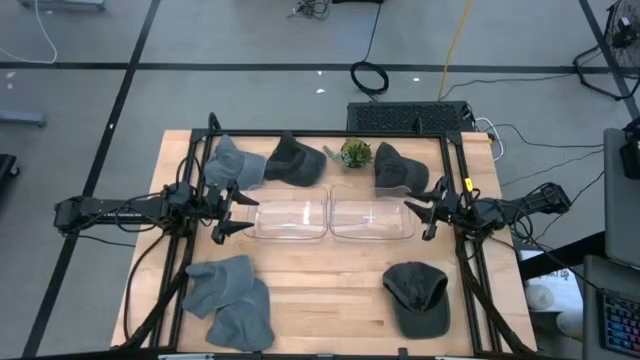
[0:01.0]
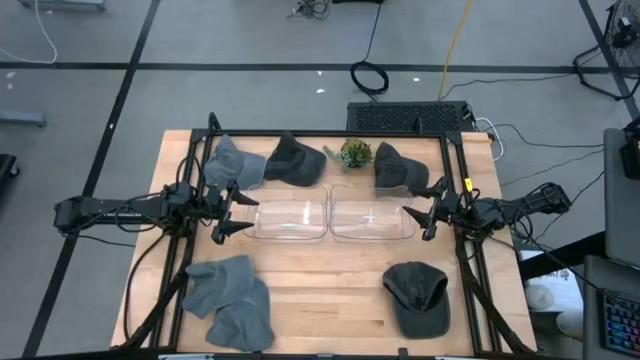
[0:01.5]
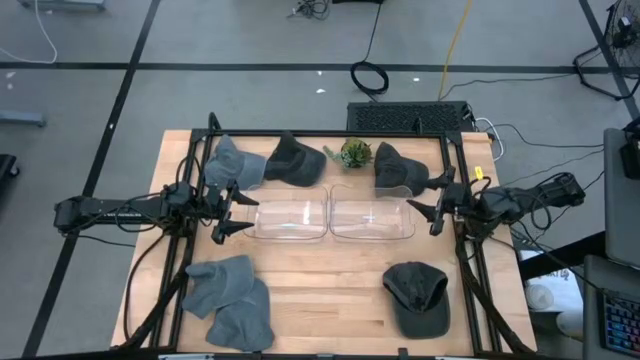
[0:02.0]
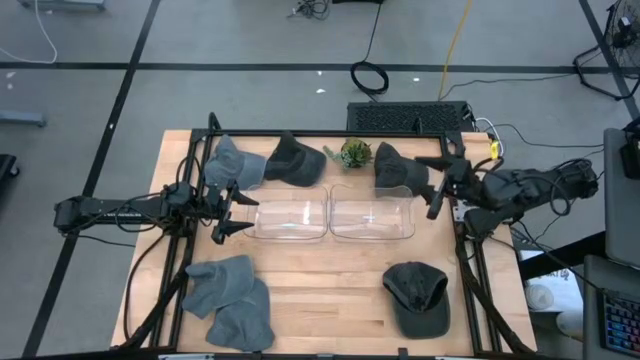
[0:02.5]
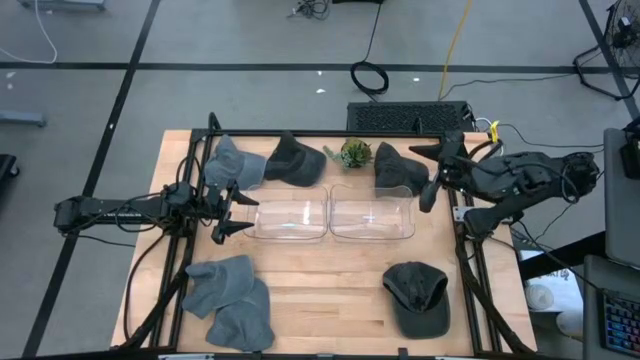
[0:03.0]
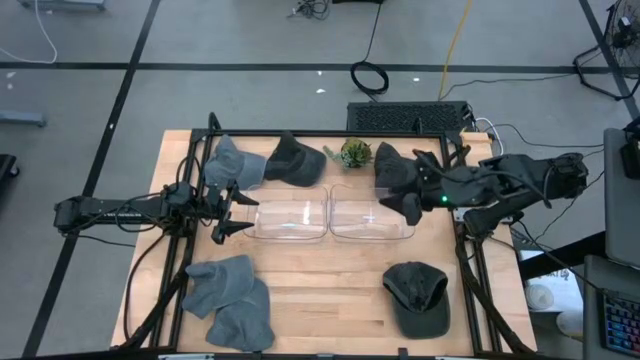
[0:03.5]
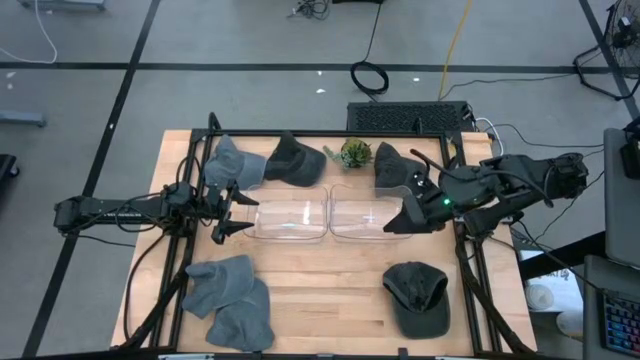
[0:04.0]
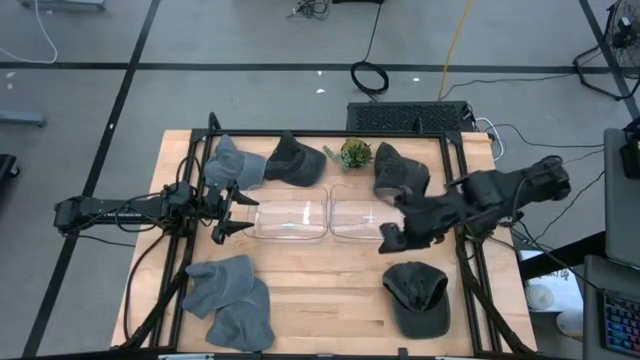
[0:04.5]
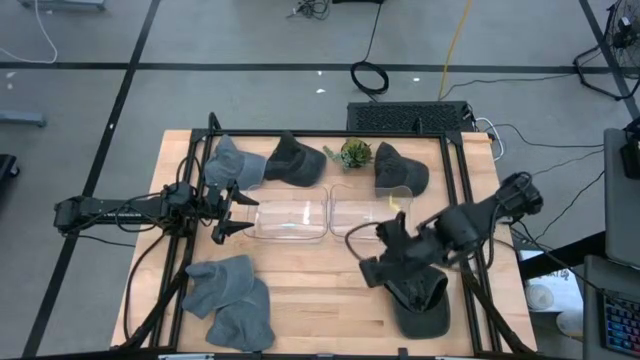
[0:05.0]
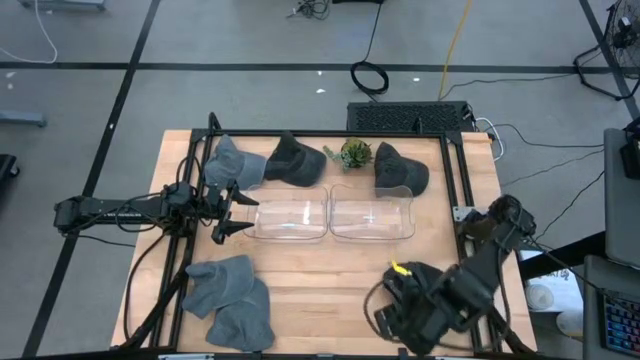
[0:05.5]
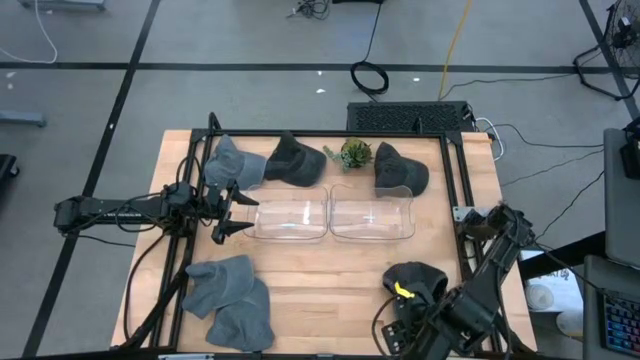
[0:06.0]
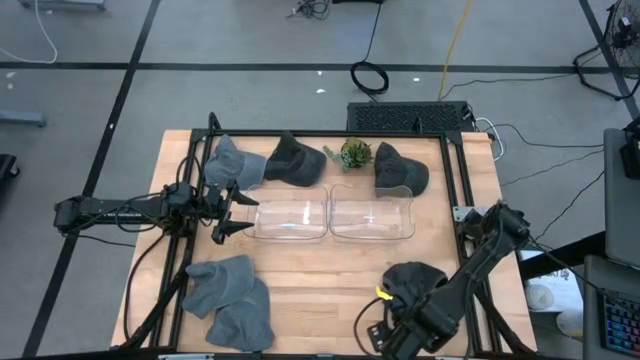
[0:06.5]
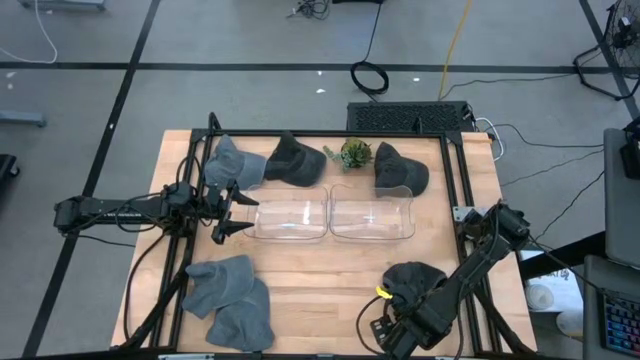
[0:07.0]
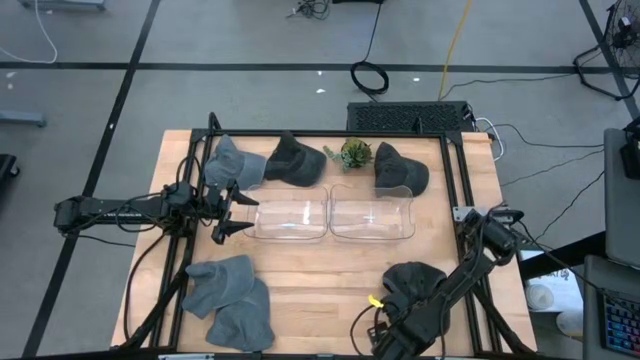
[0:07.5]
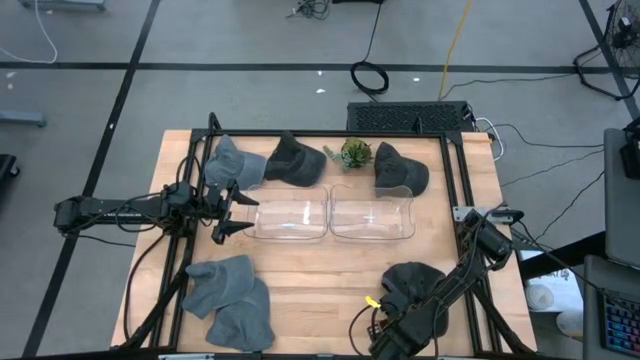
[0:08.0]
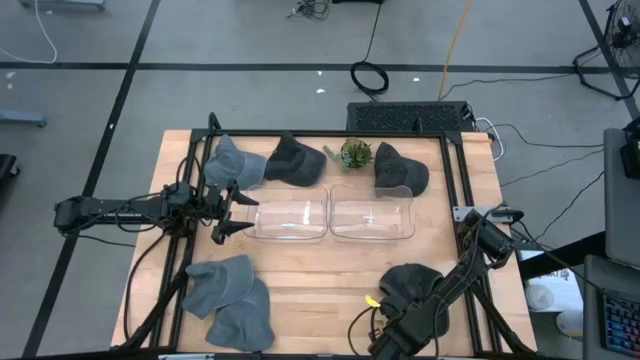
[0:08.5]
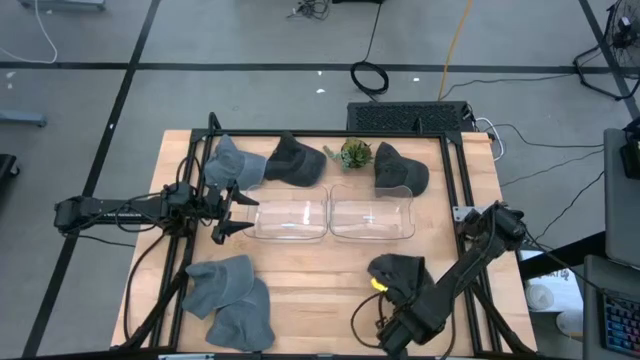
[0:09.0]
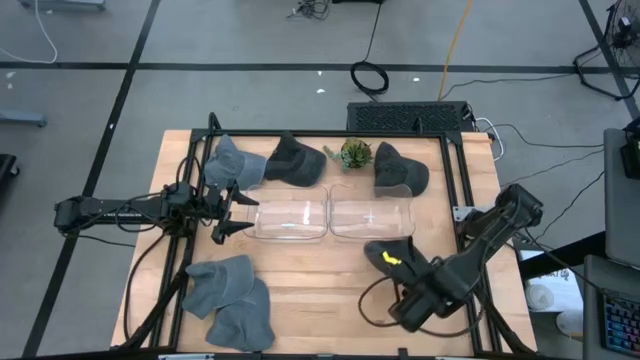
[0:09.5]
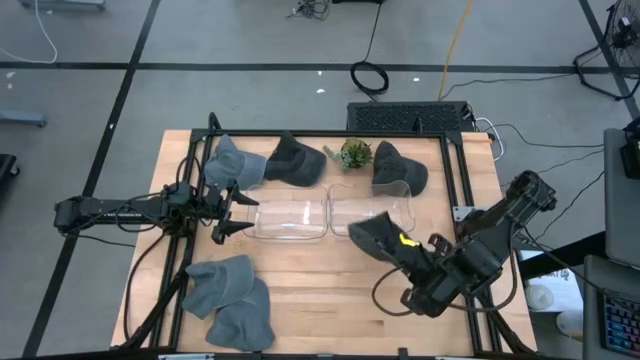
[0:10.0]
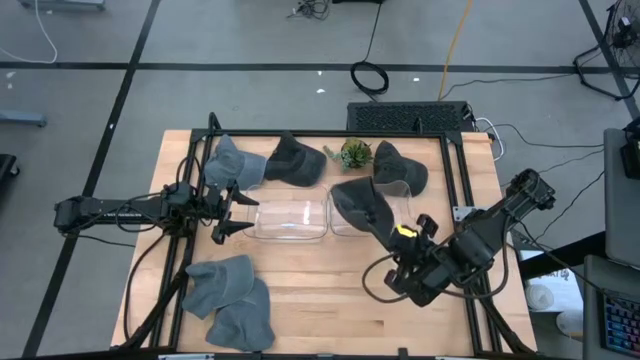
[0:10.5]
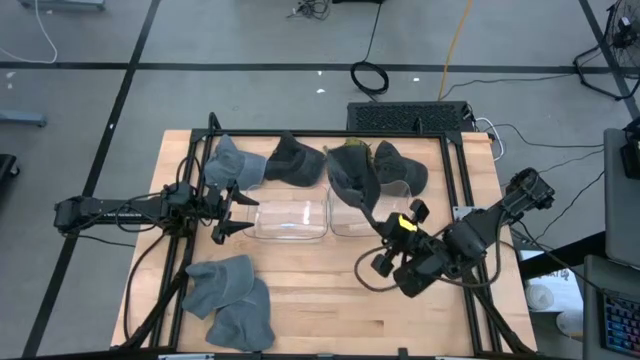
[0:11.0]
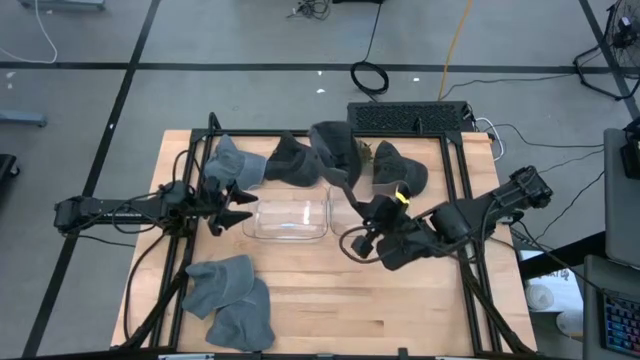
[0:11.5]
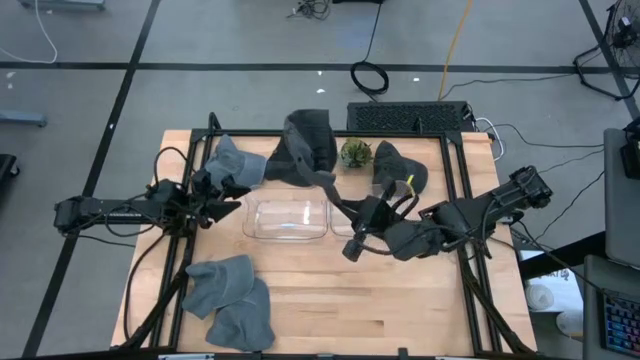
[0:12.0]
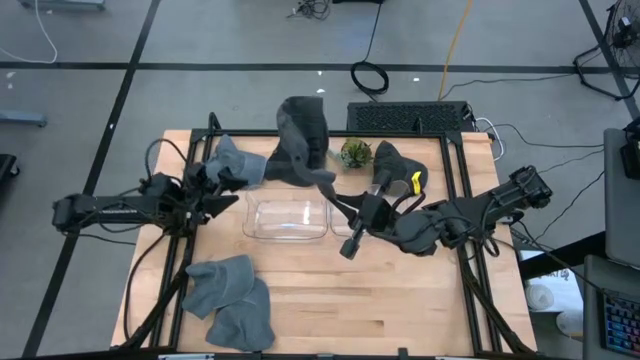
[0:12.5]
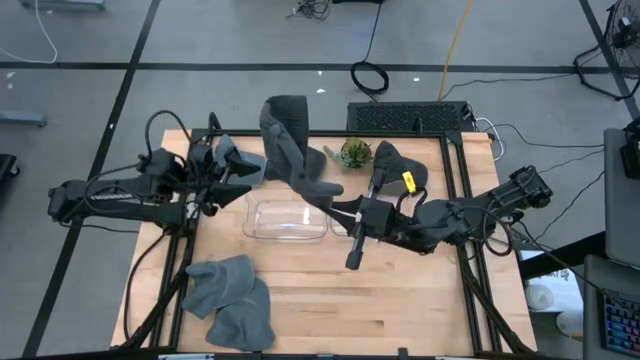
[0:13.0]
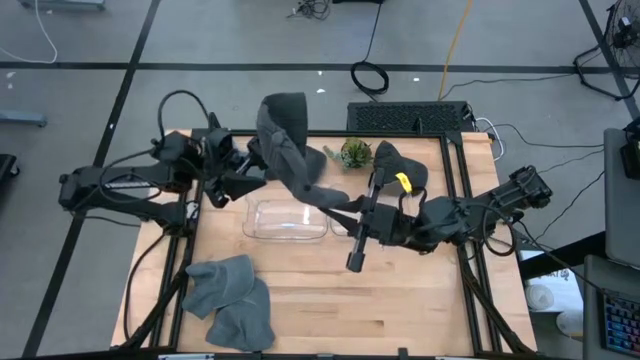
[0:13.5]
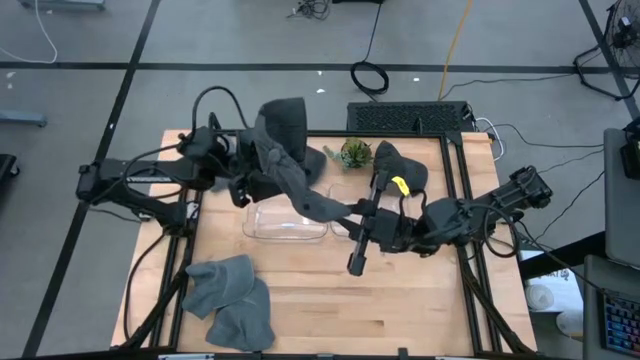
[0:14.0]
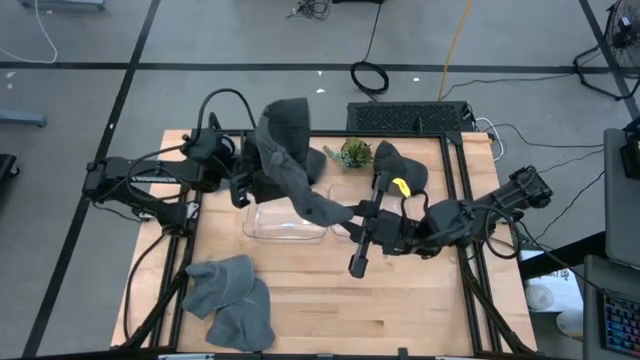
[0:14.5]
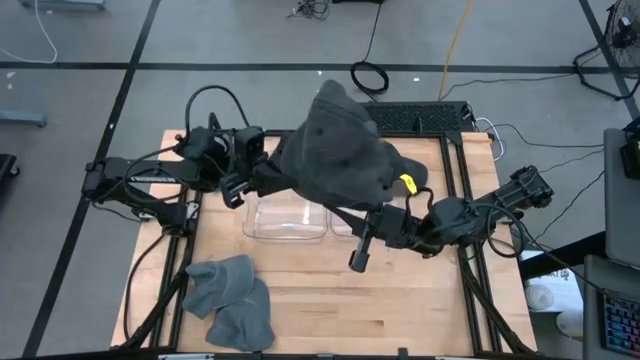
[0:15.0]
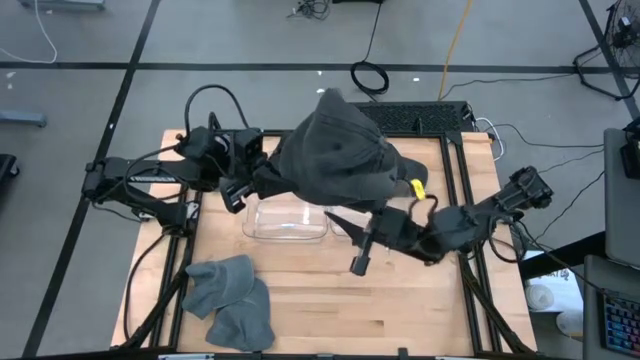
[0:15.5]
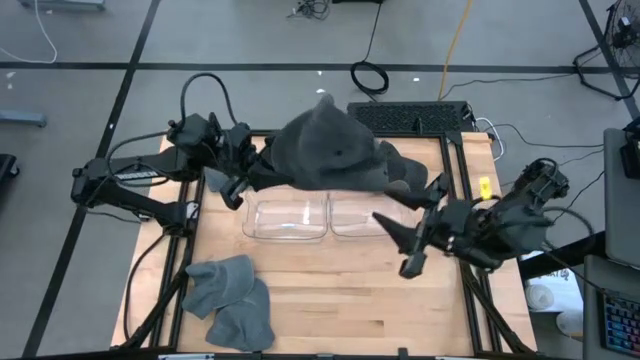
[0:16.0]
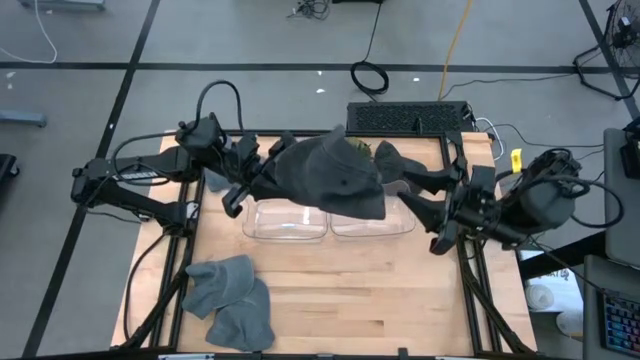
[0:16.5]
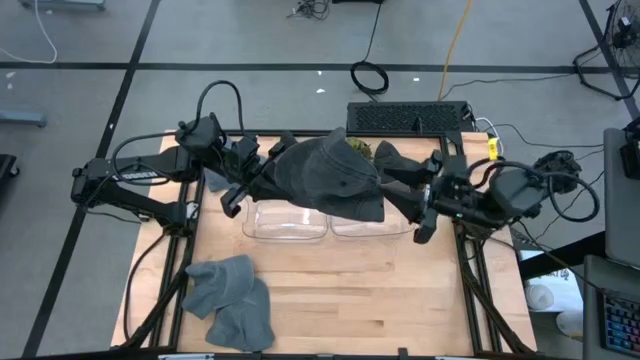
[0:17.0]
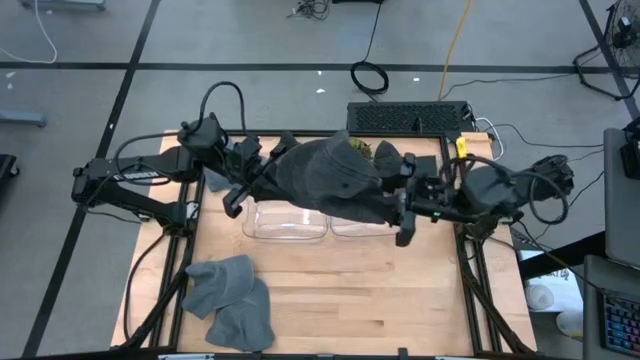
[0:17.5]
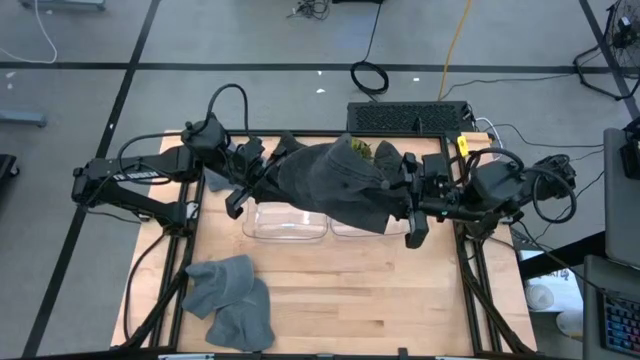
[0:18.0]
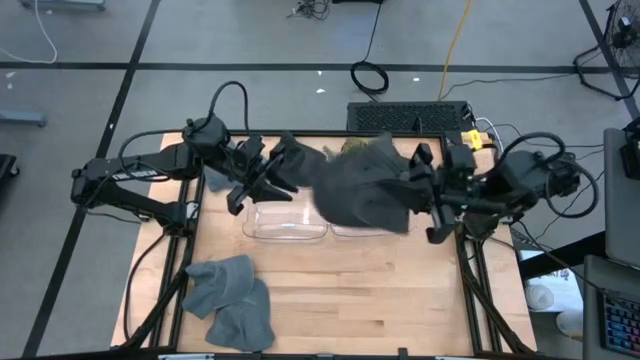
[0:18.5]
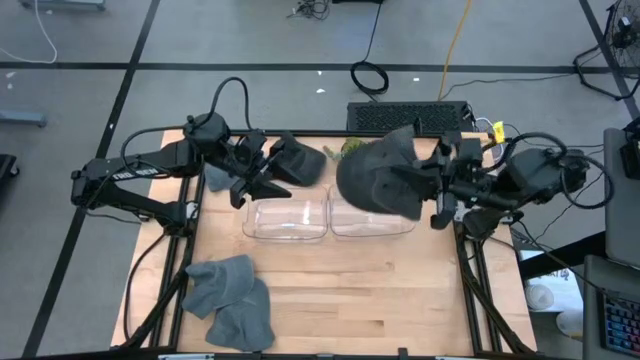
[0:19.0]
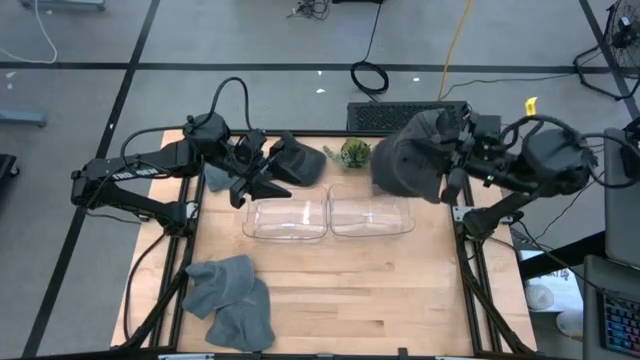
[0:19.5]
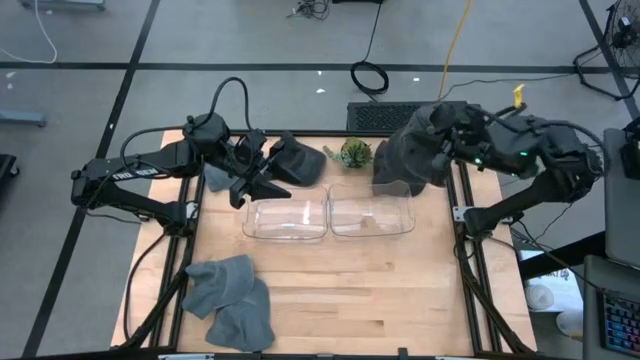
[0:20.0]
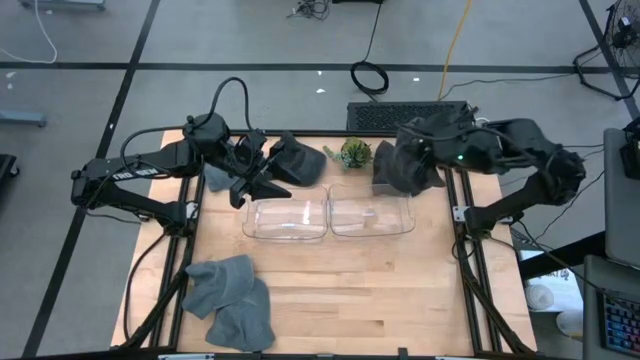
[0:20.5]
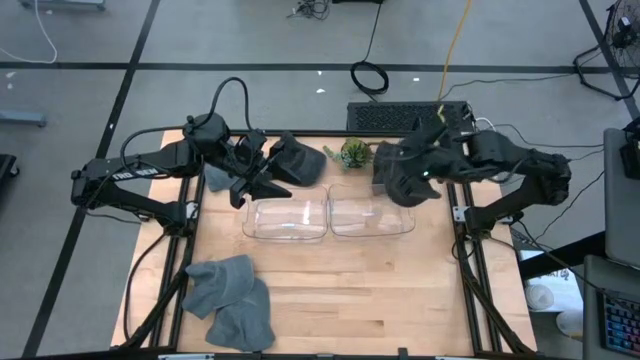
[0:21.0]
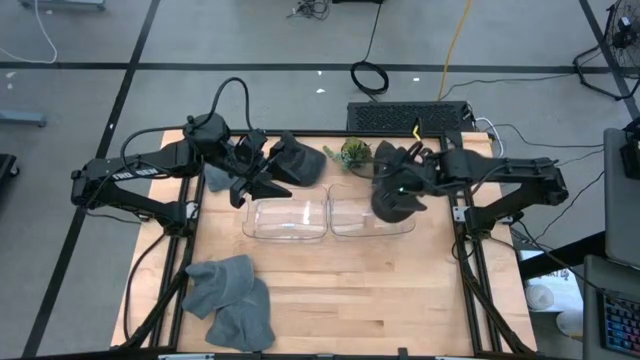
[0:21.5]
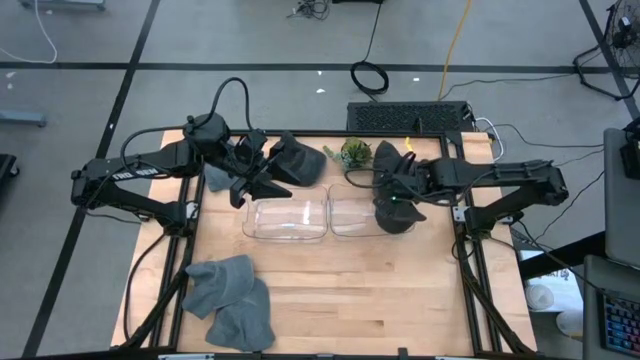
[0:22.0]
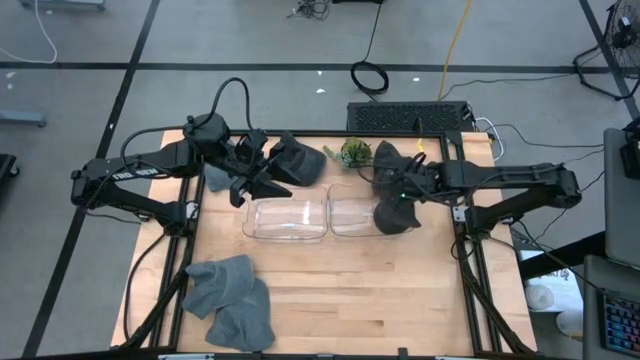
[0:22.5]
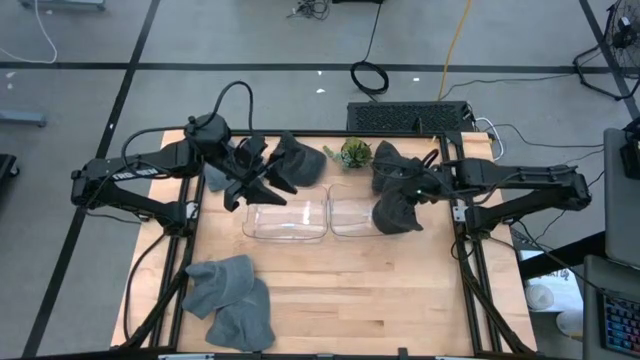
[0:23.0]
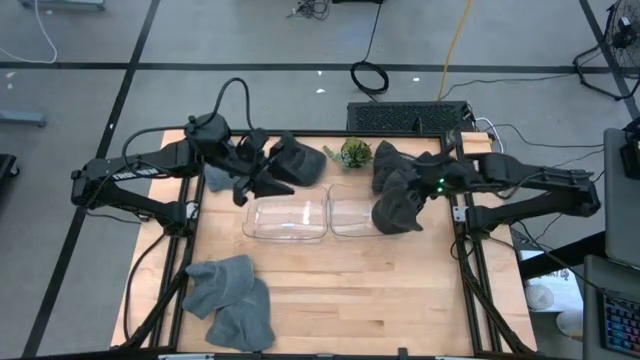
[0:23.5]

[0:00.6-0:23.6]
Task: Pick & Place hat
Put the bottom black cap into the right transparent bin
